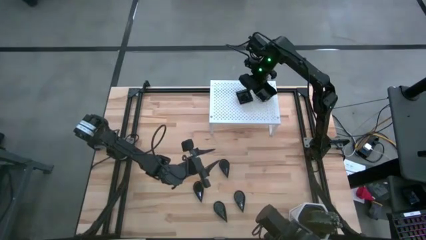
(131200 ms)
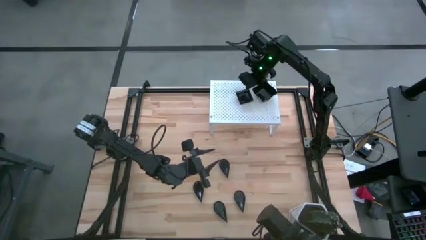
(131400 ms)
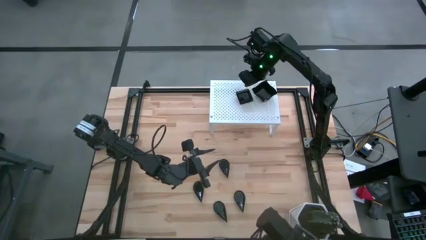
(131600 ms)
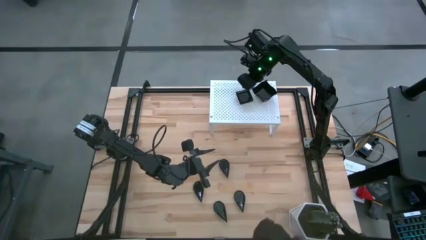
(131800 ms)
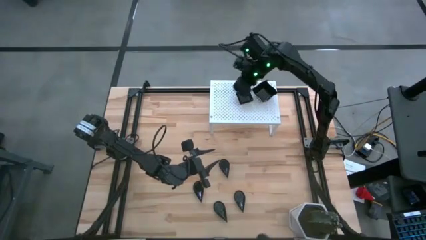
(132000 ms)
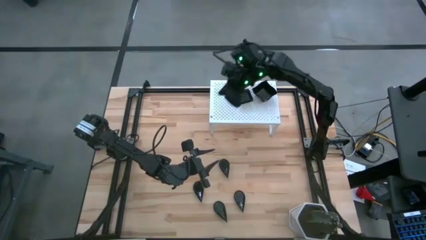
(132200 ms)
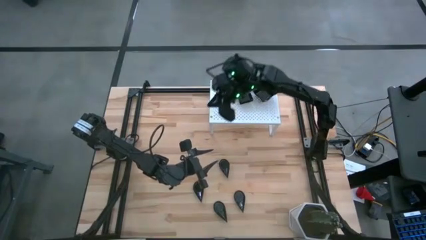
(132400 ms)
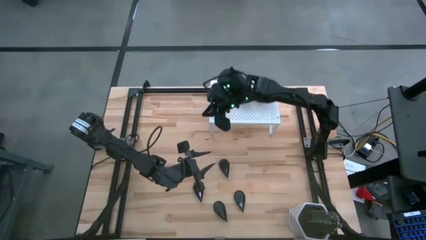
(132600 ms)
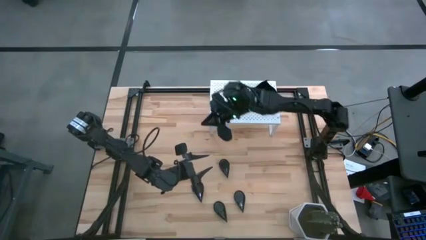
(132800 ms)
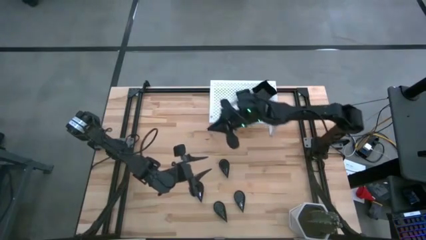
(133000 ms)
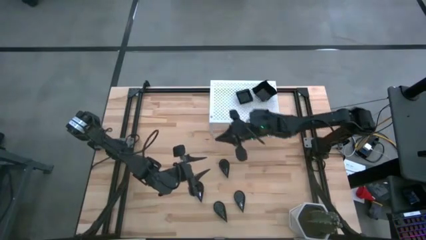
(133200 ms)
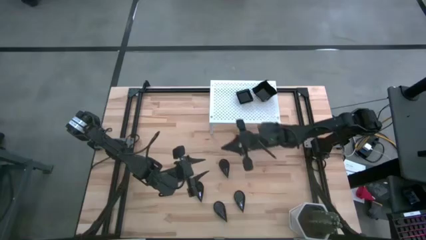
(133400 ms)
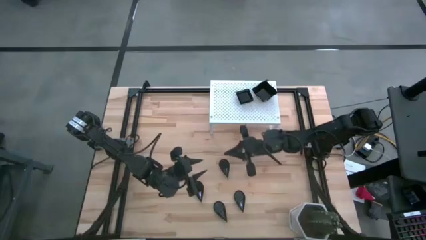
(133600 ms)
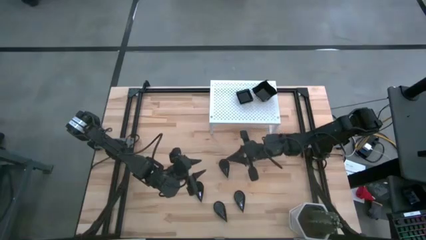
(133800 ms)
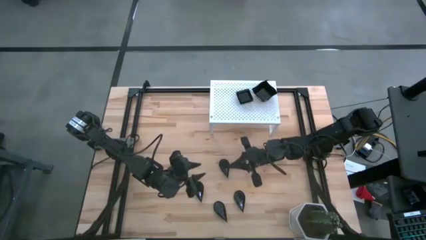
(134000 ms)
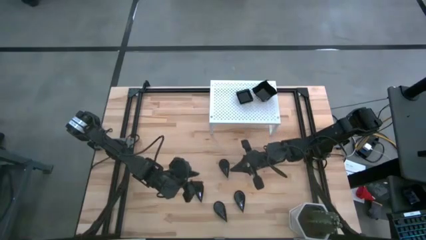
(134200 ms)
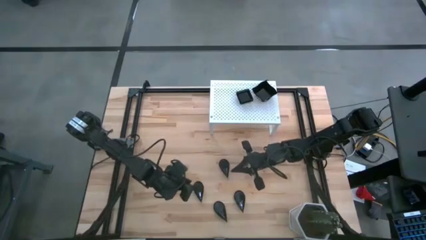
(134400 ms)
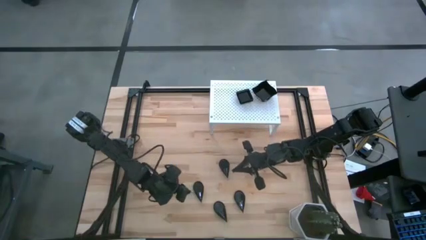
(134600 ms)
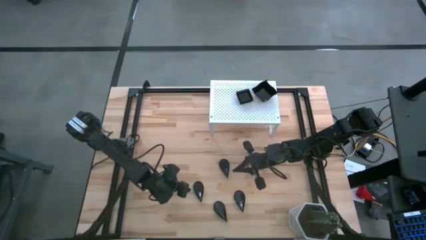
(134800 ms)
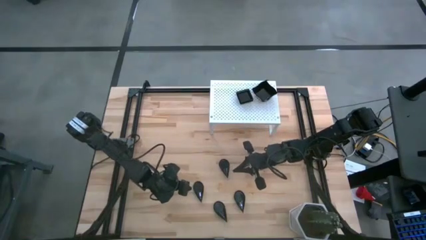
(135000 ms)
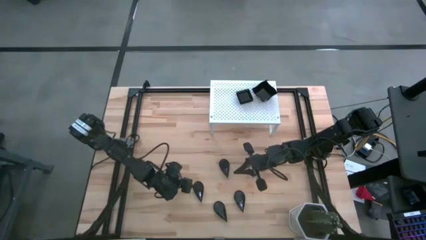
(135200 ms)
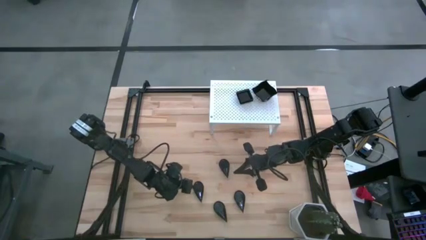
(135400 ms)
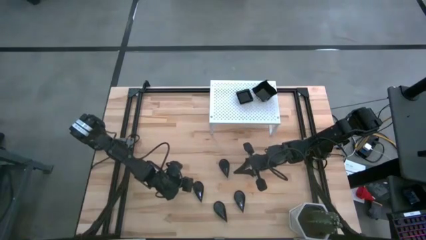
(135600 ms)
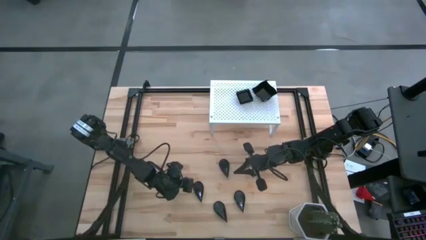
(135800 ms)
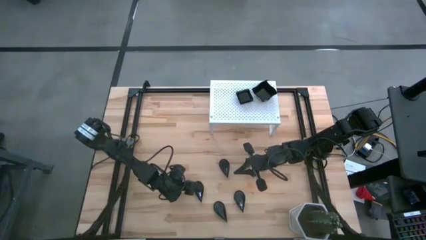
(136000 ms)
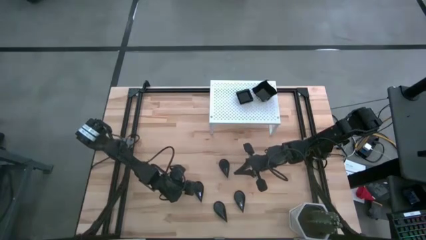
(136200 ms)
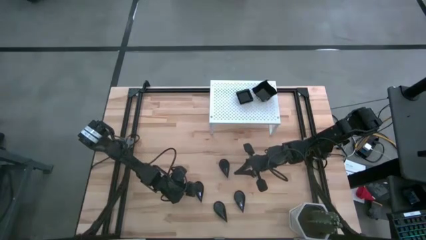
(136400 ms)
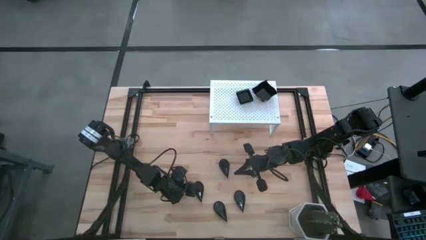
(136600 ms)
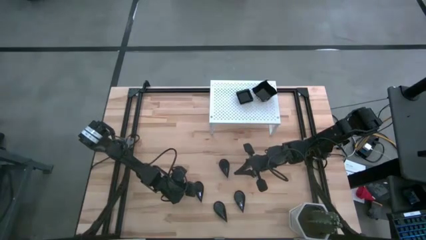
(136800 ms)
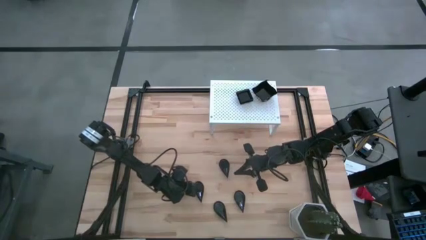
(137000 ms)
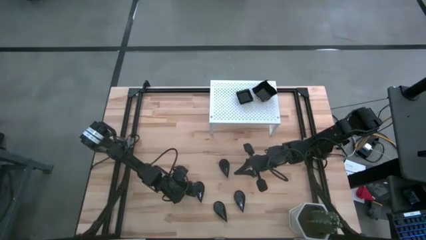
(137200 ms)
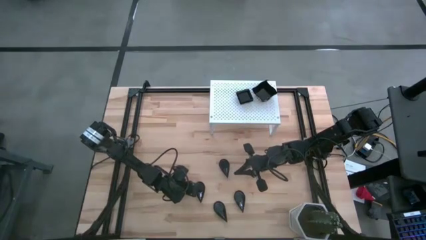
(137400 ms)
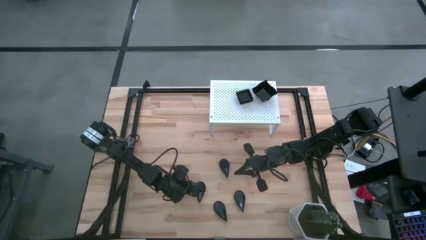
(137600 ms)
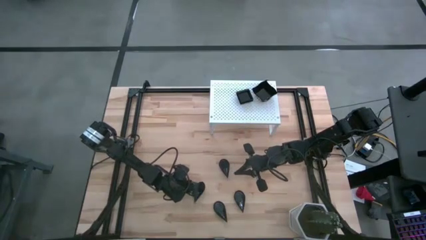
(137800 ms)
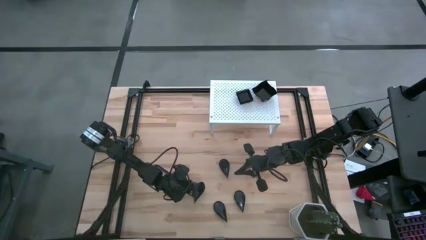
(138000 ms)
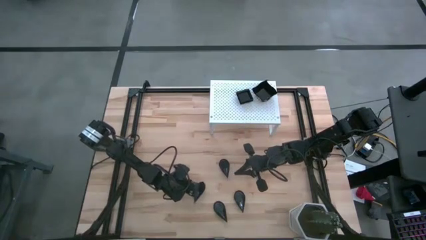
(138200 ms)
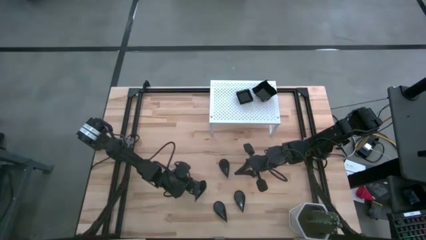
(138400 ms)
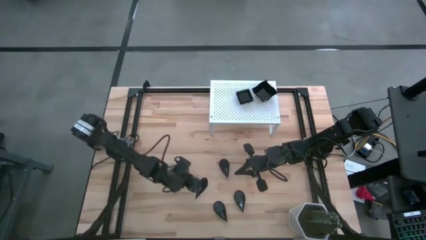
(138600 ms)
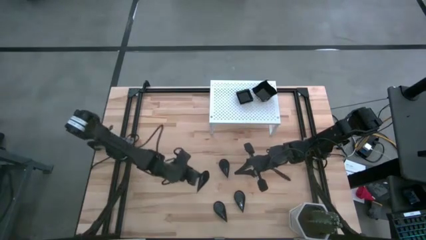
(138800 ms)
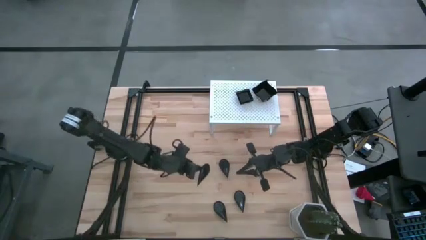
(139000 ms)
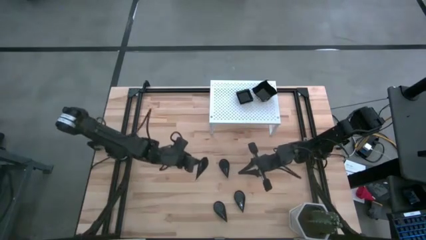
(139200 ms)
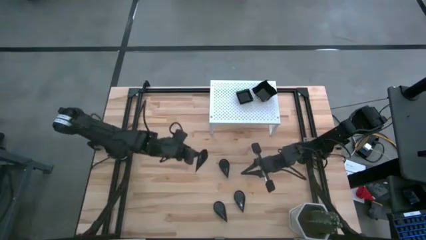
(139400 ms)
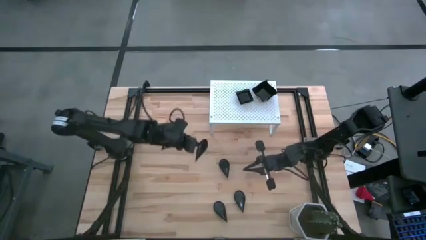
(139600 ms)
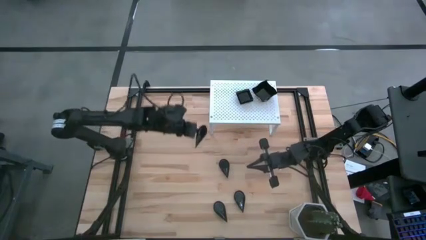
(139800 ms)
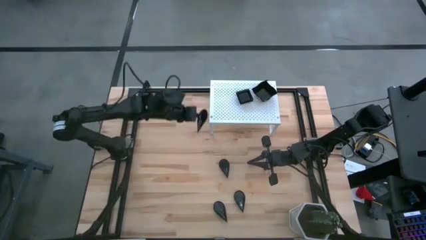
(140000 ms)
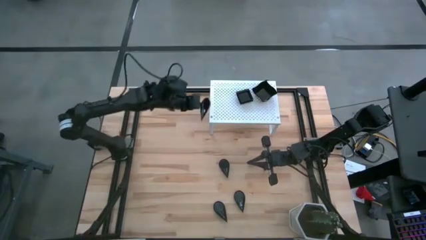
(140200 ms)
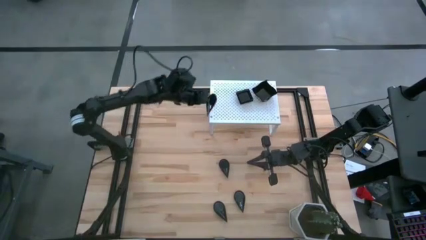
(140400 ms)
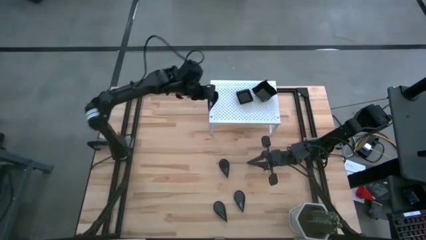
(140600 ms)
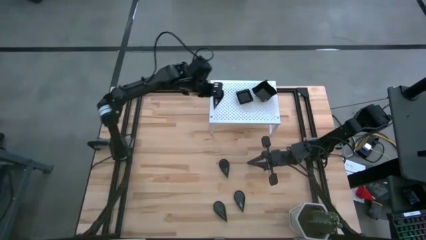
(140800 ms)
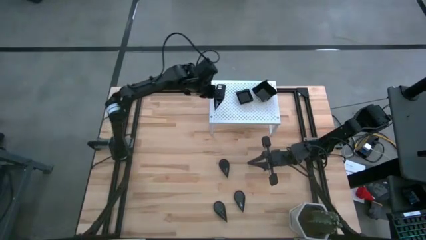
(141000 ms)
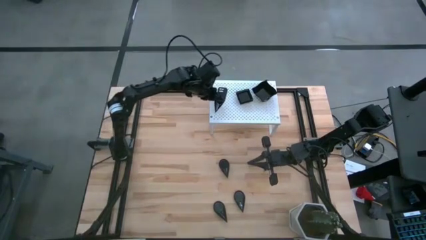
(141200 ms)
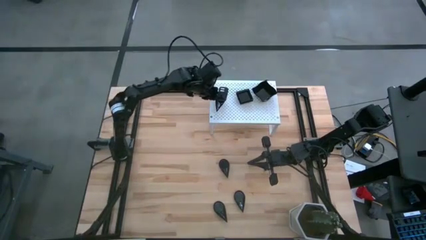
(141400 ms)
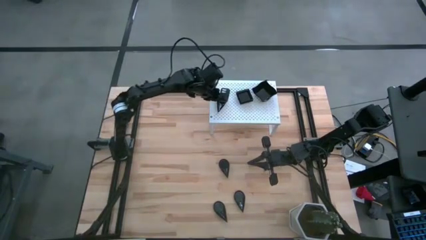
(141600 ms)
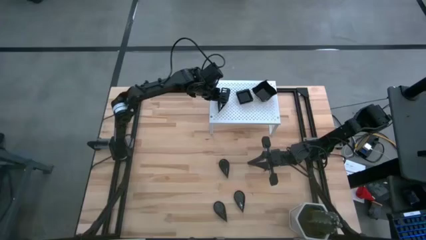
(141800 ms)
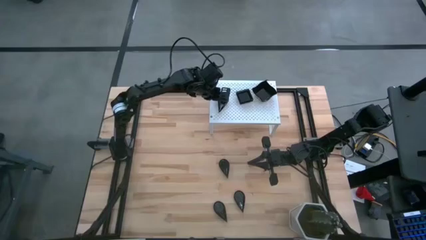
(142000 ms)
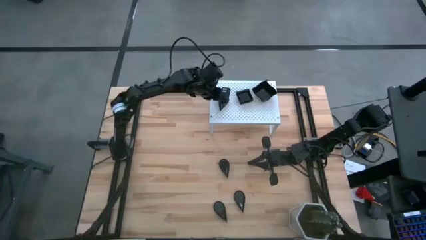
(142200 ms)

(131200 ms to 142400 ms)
Task: Pick & Place Mini shaped plates
Put the drop shaped plate on the shelf
